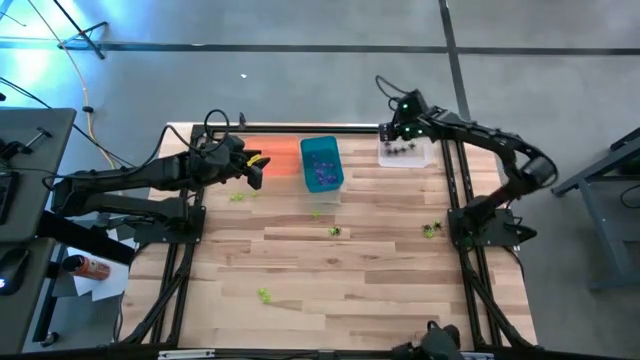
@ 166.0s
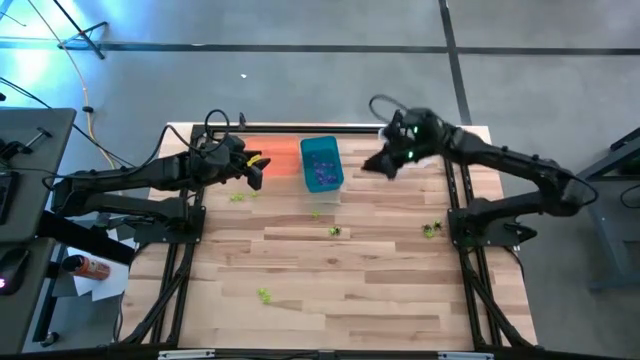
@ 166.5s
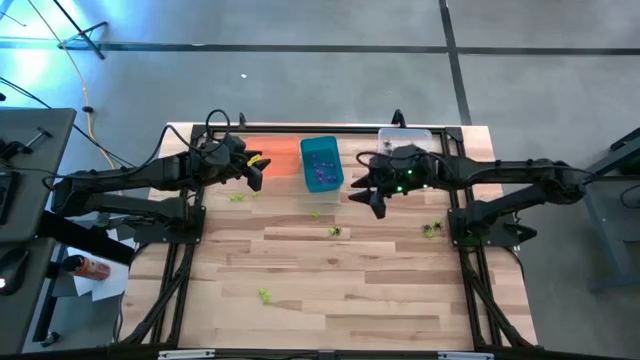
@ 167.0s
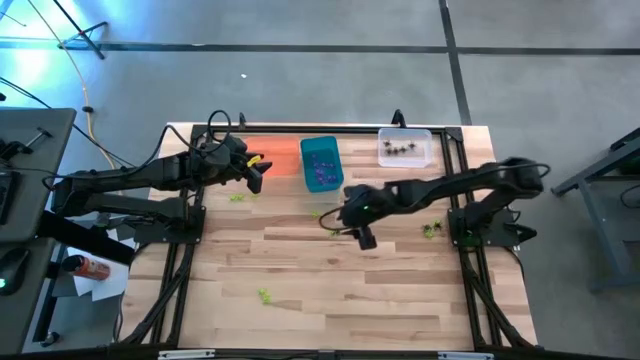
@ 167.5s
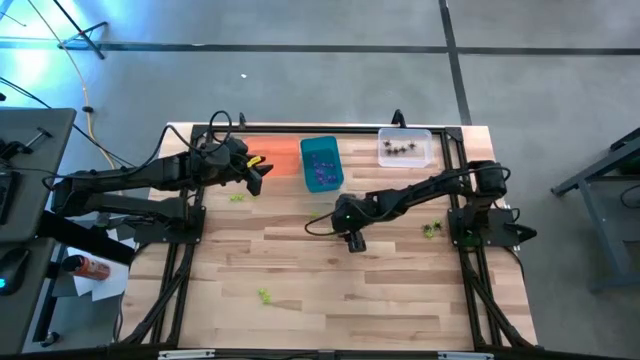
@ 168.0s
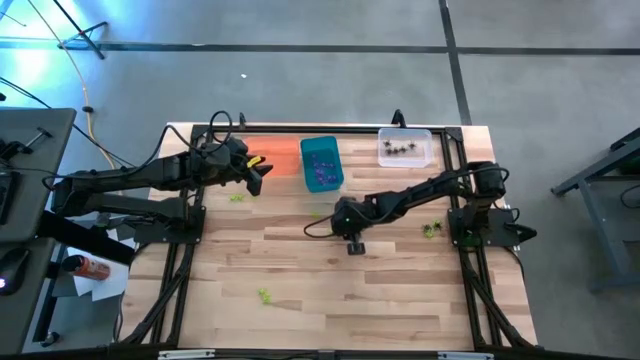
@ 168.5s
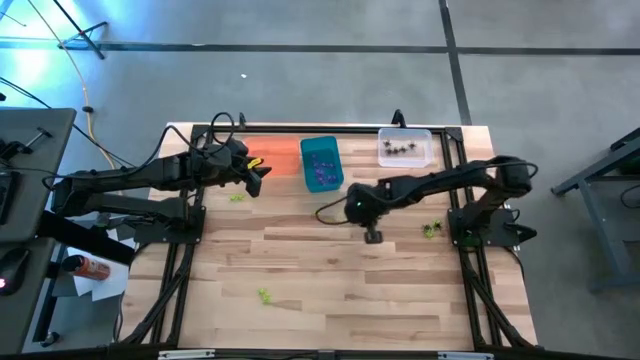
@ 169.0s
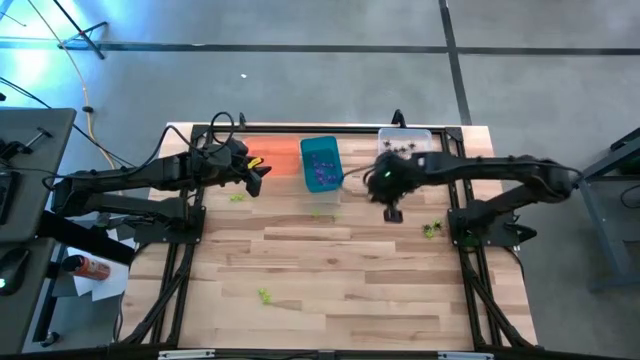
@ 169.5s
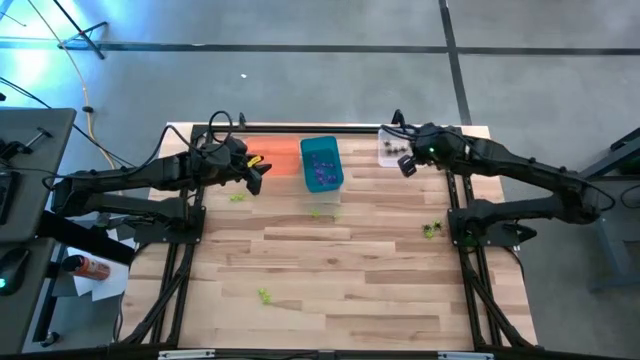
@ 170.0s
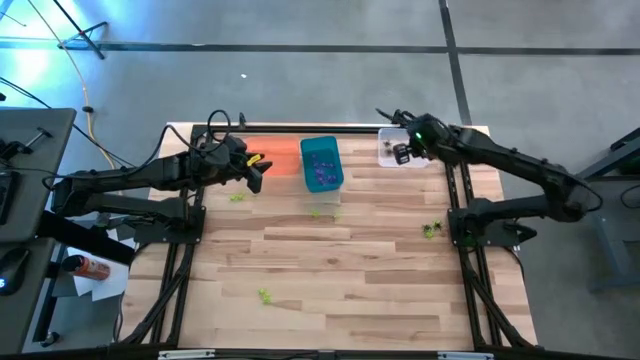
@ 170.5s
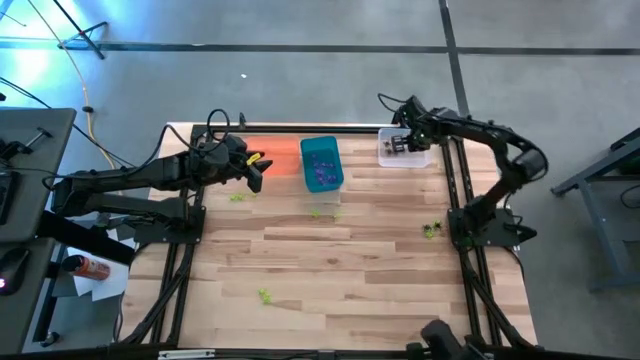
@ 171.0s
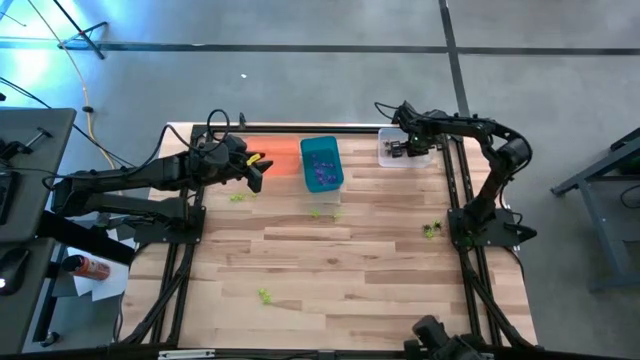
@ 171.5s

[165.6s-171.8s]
Task: Sort Halloween decoration
Put the black spider toy into the transparent bin

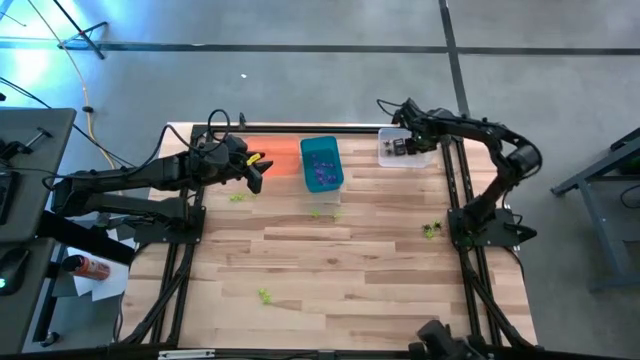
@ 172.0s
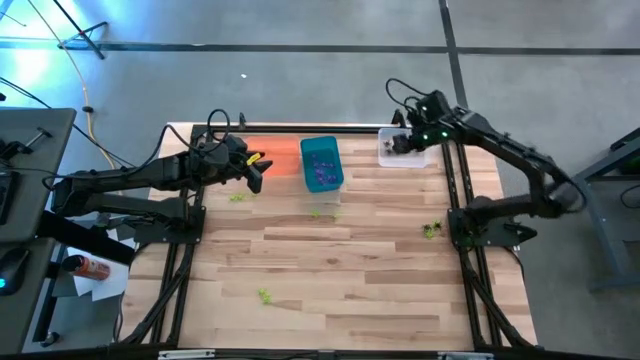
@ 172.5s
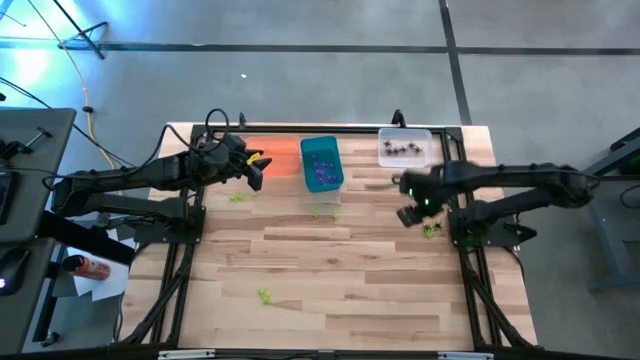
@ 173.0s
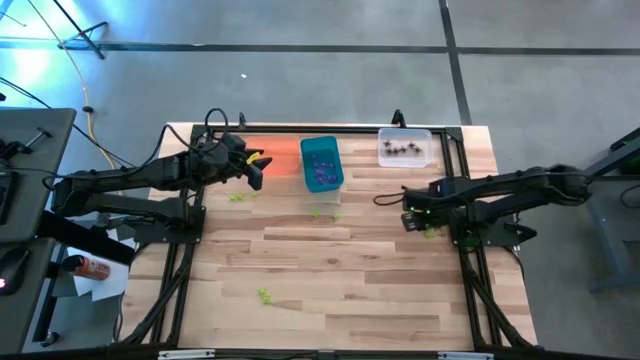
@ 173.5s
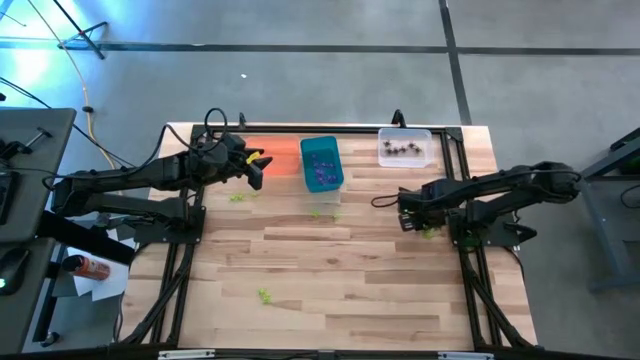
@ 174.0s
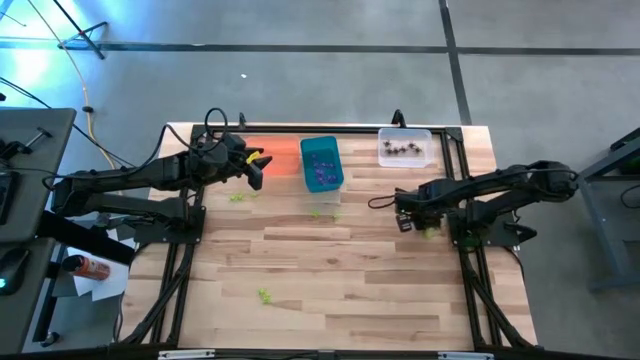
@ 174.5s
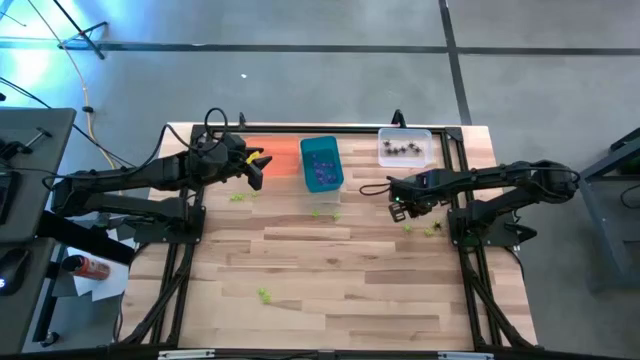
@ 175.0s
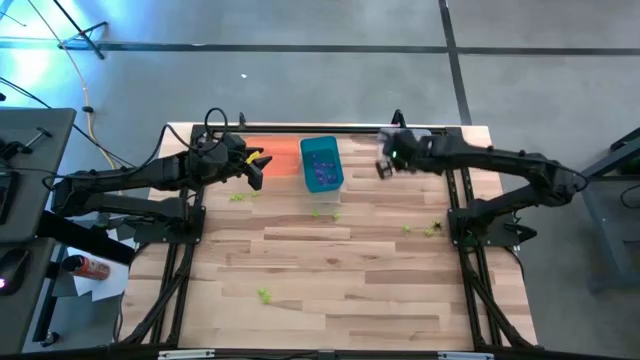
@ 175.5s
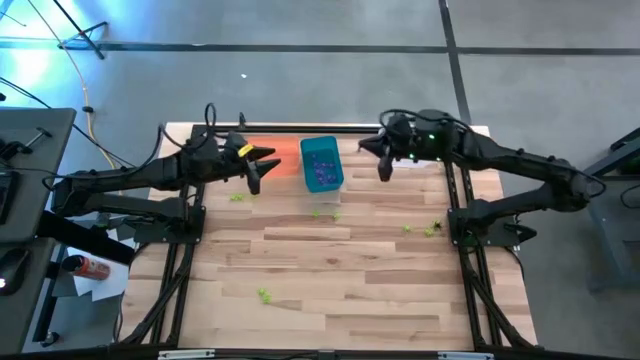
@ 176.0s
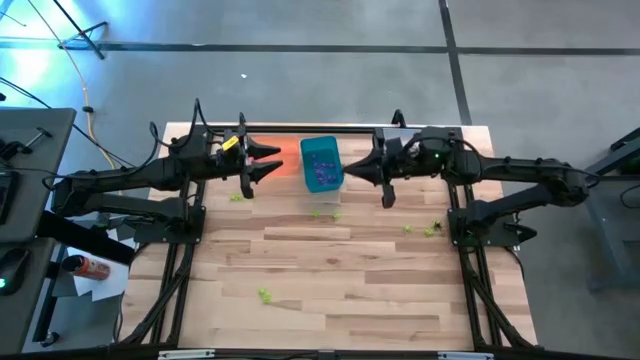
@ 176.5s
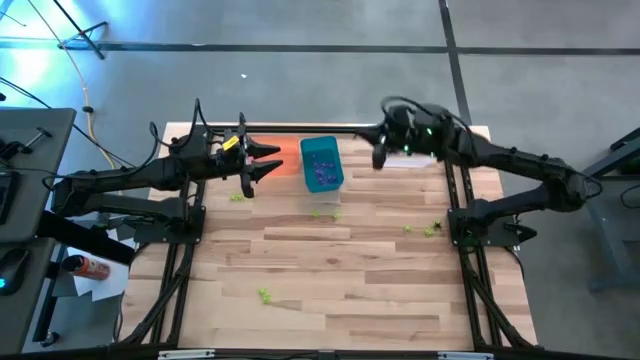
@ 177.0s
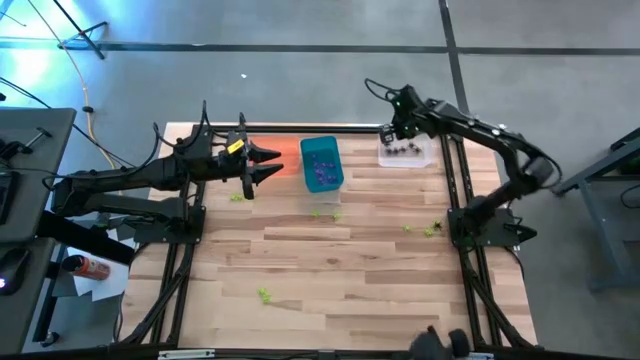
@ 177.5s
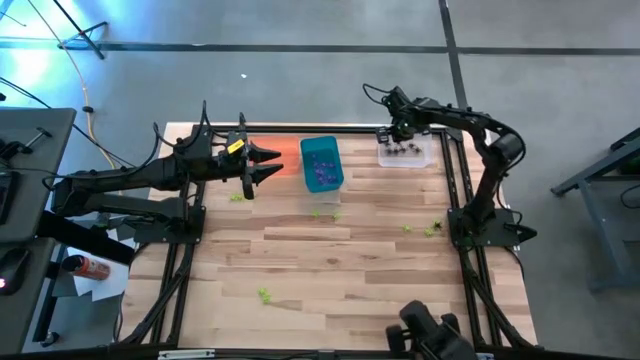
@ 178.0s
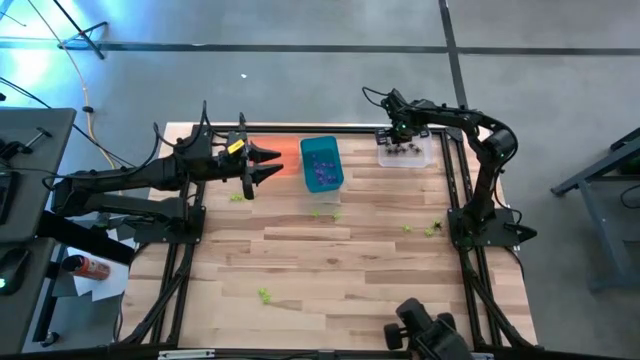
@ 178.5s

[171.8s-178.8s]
Put the black spider toy into the transparent bin

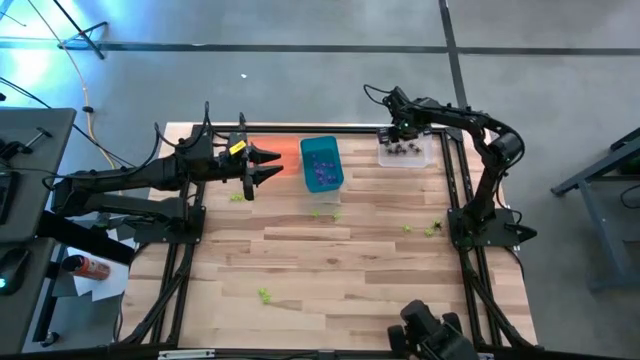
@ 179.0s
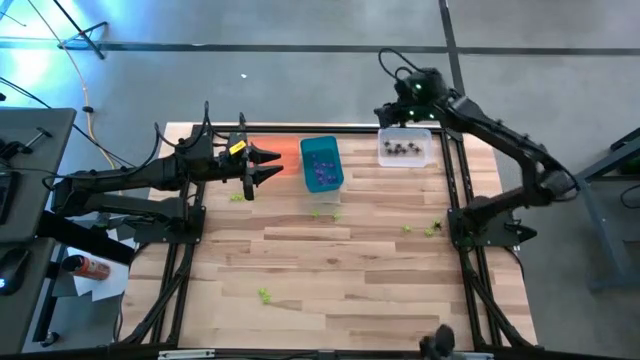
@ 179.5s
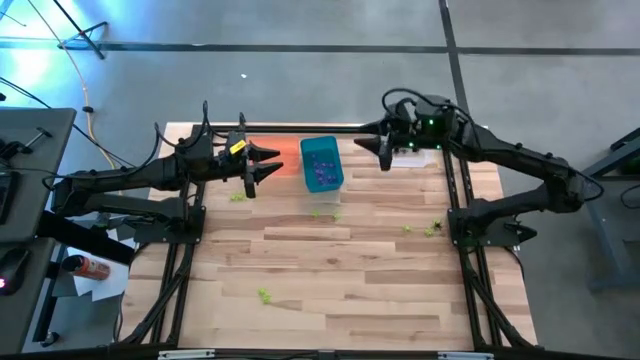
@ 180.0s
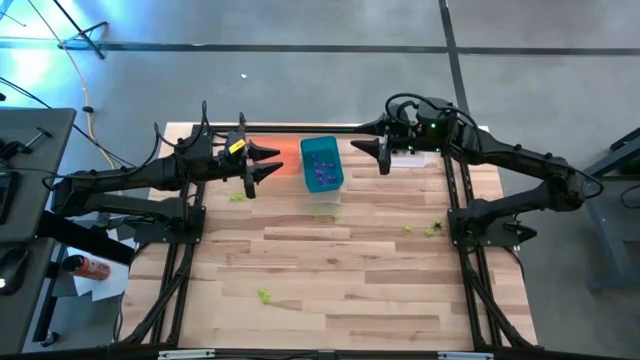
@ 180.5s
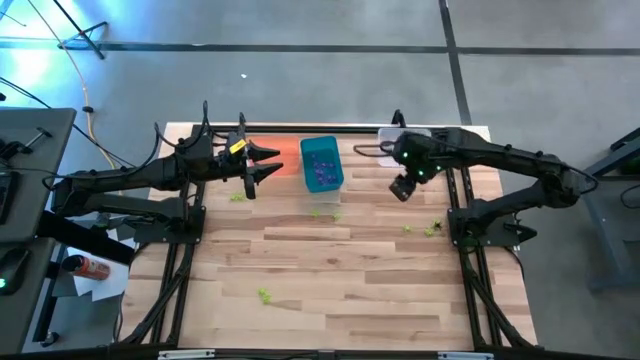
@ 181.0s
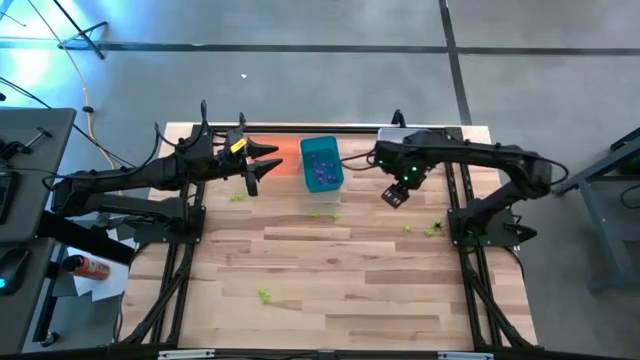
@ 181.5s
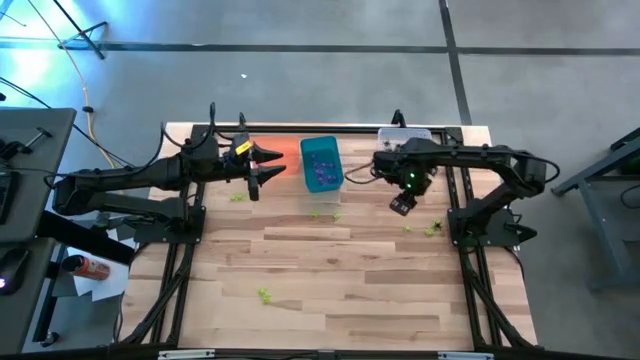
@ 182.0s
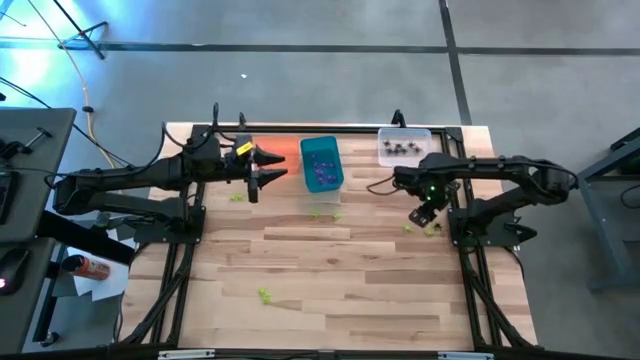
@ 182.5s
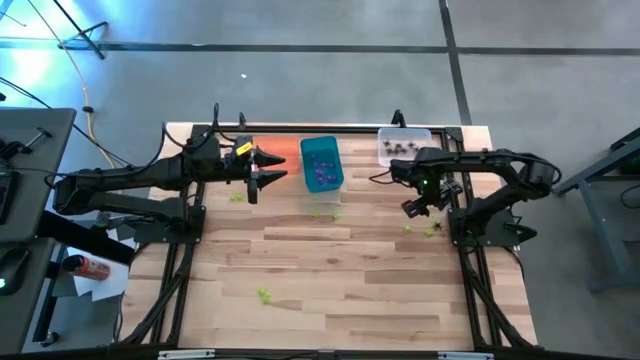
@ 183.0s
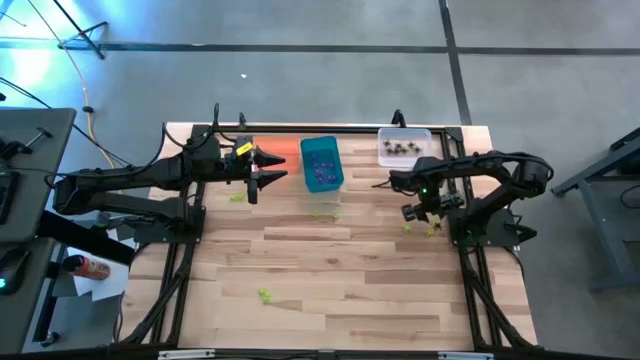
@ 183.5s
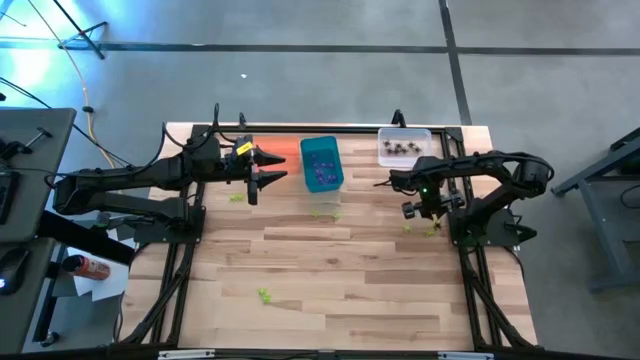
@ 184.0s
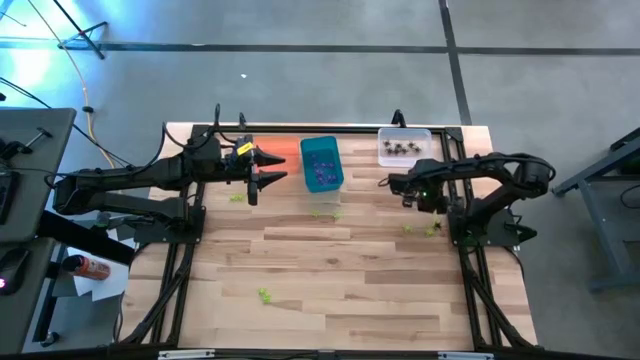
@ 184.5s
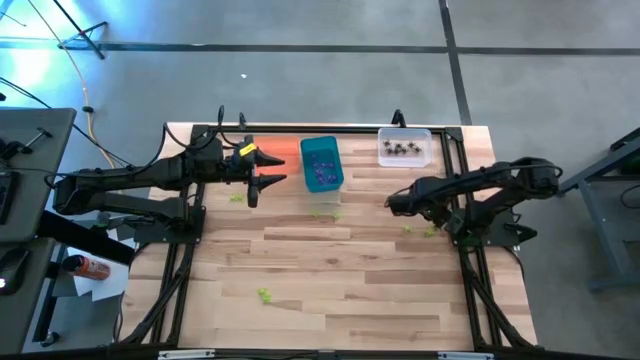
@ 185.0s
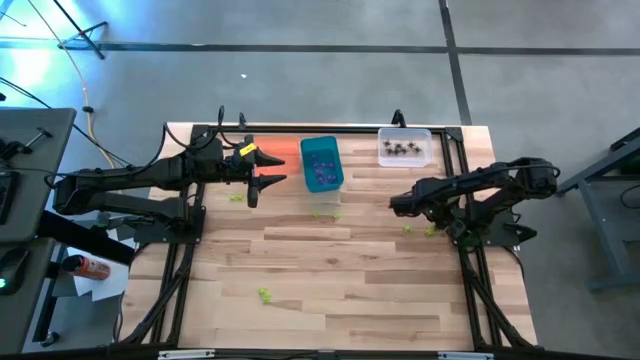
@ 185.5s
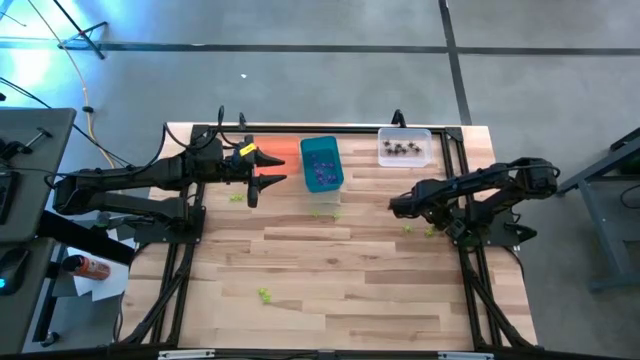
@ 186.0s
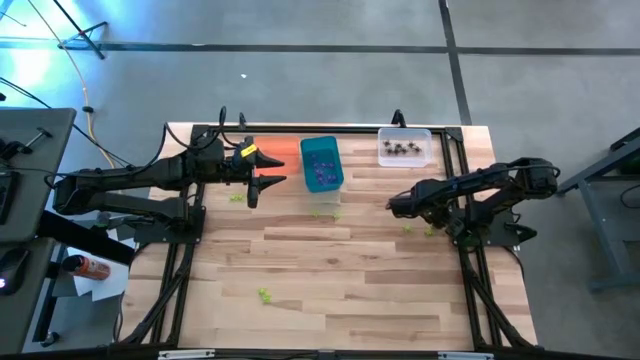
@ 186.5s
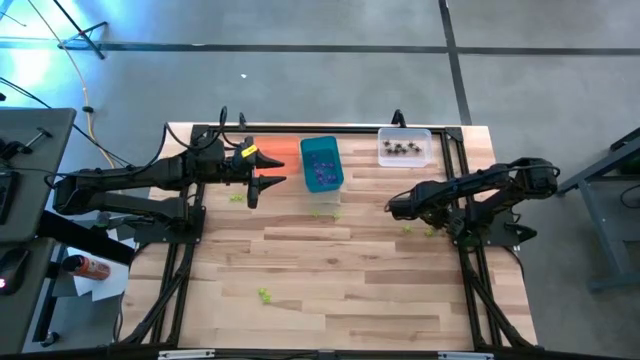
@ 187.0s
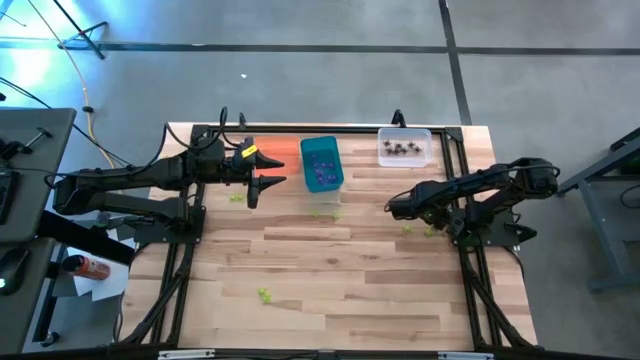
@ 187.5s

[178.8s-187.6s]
Put the black spider toy into the transparent bin
